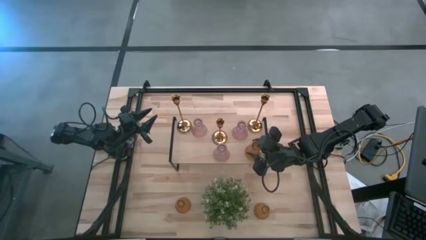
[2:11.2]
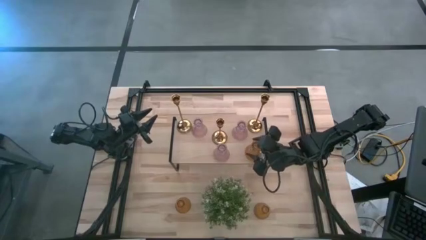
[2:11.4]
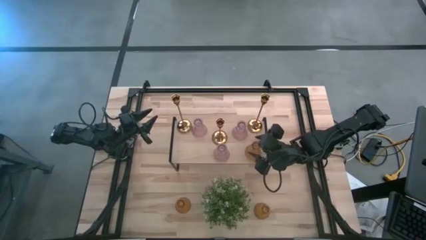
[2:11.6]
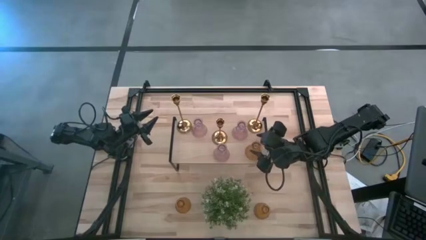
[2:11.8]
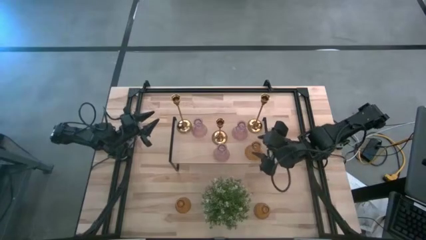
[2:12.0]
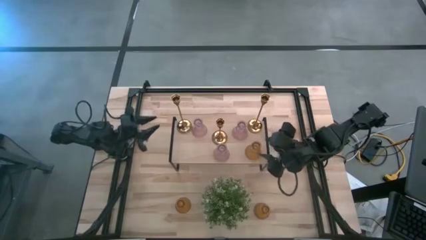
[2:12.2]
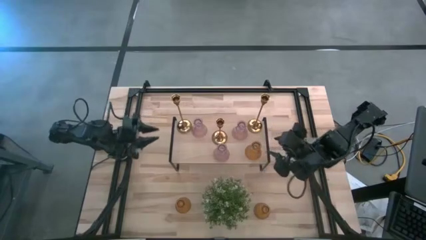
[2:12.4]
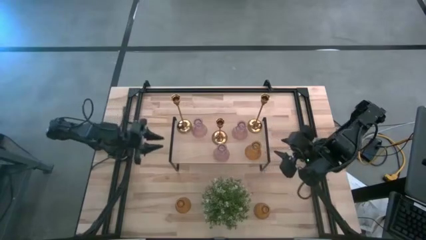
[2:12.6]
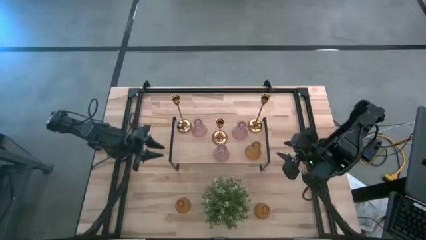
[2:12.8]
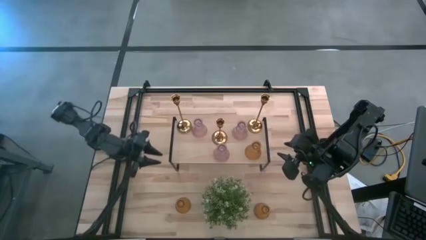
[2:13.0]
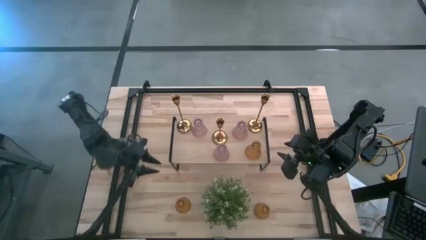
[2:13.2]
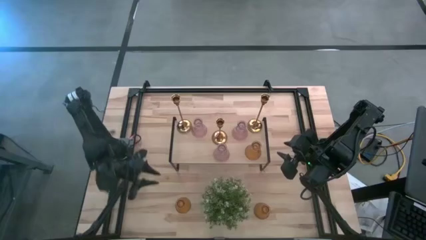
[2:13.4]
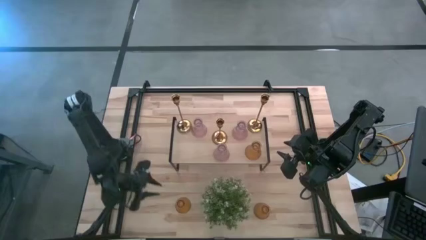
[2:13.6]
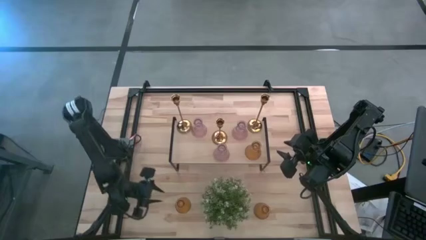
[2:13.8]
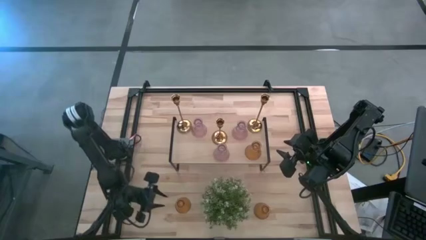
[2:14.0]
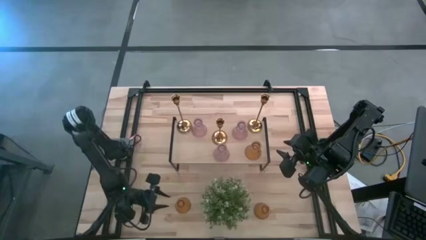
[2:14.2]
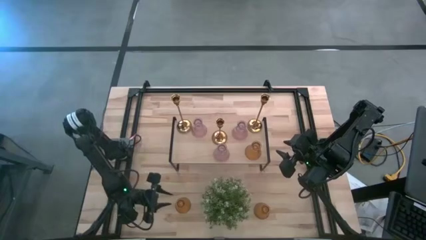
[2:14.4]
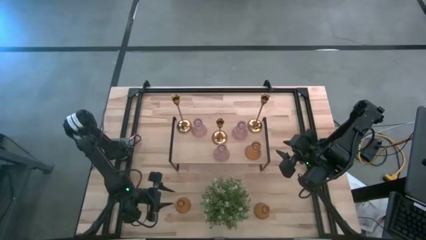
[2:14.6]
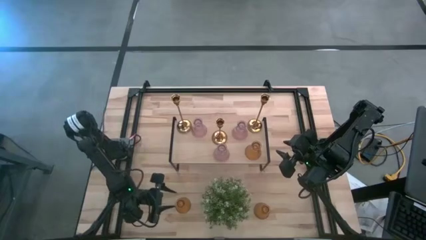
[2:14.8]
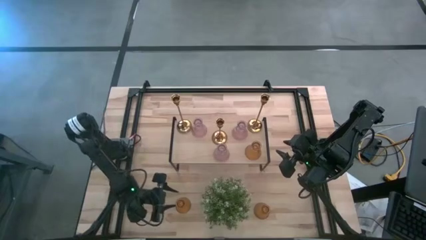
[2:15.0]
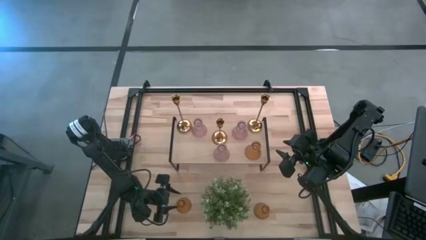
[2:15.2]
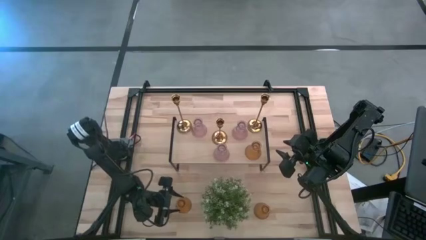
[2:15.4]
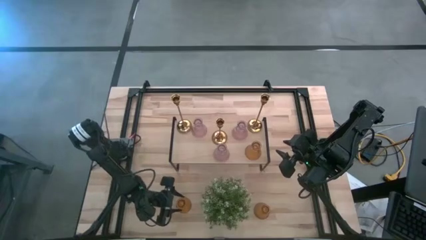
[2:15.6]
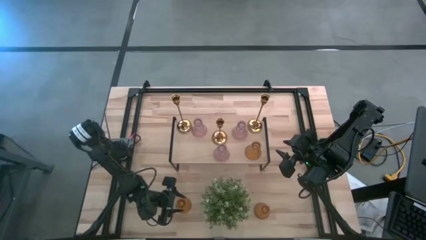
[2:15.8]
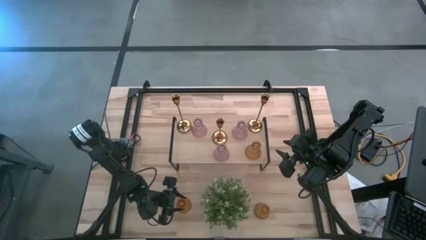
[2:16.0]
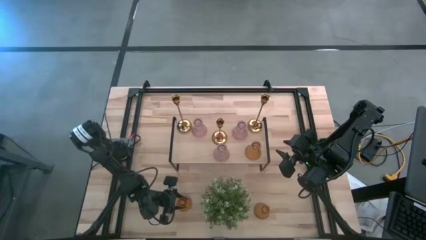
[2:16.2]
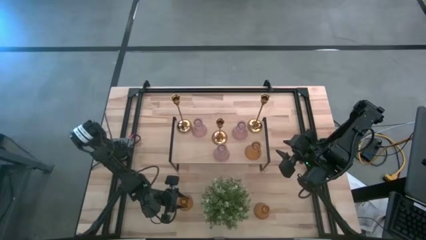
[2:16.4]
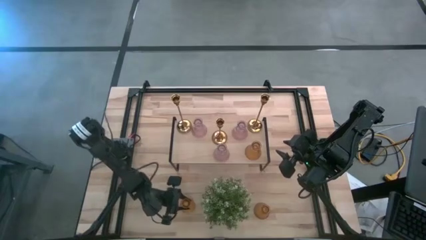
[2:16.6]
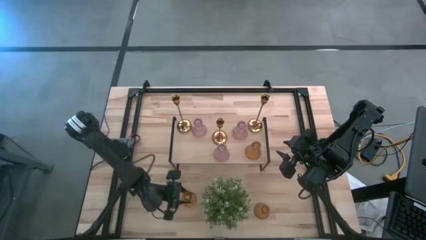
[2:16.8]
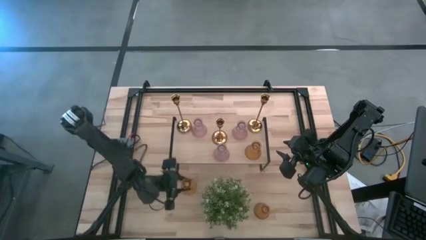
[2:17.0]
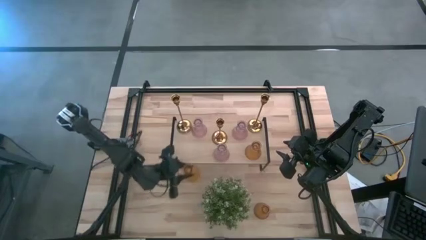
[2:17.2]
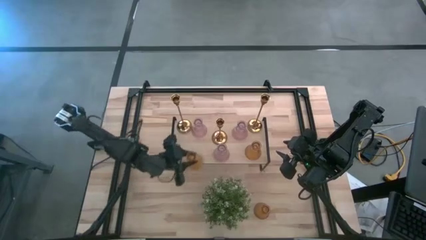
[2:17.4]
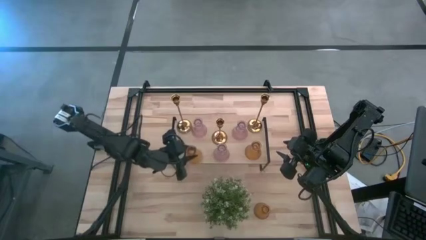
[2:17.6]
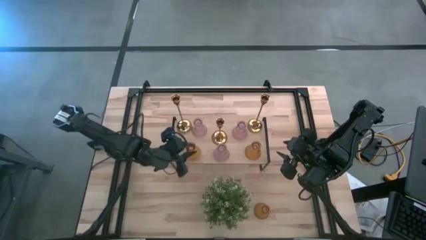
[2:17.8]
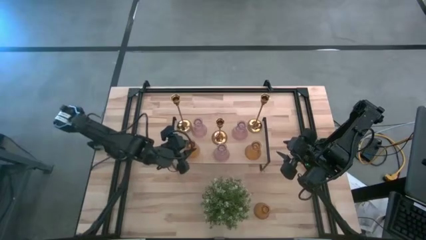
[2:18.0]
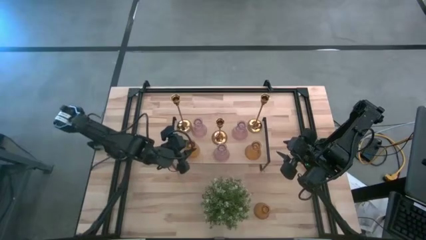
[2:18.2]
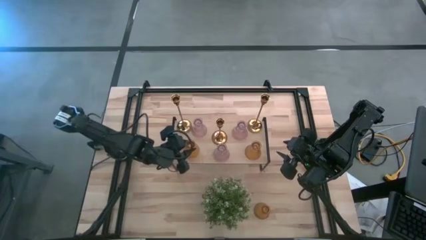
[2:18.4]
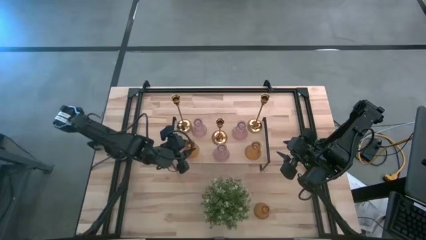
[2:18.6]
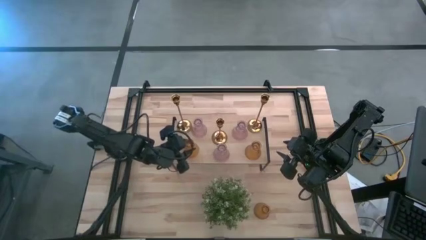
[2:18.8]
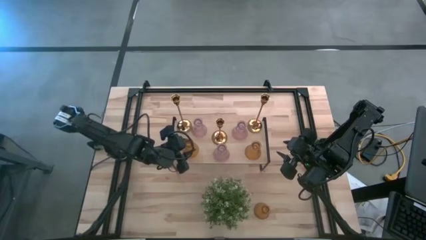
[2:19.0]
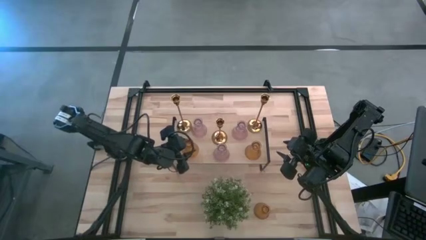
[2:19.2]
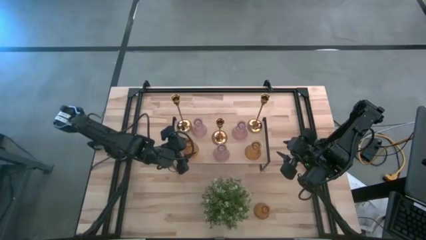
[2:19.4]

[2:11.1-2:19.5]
Task: Pick & Place candle stick holders
Put the left yellow vase on the shelf

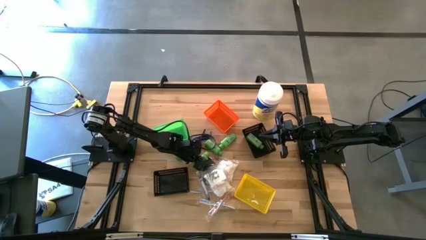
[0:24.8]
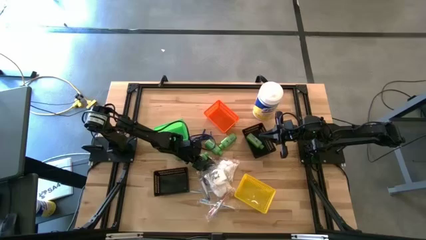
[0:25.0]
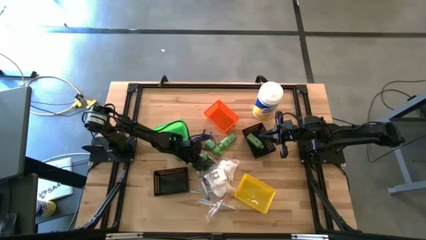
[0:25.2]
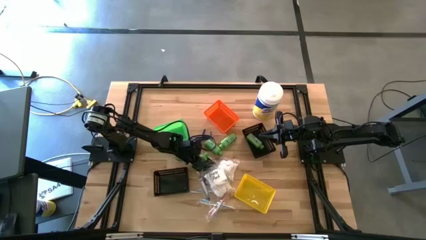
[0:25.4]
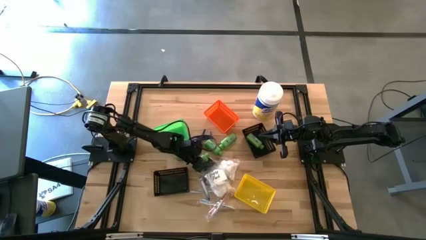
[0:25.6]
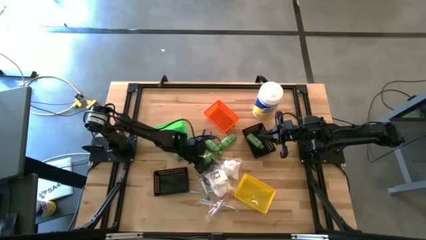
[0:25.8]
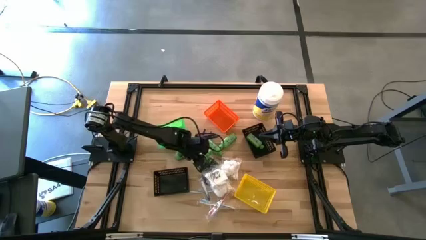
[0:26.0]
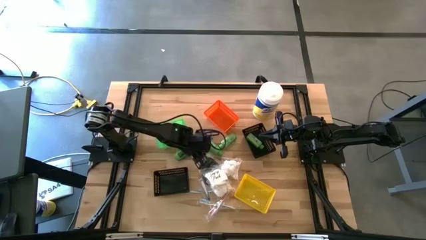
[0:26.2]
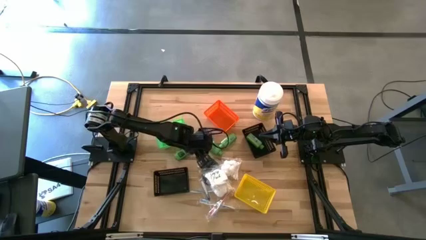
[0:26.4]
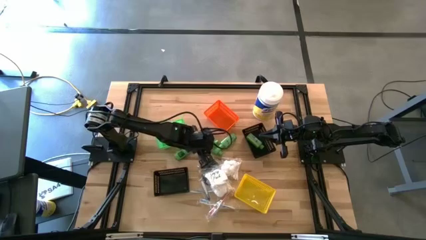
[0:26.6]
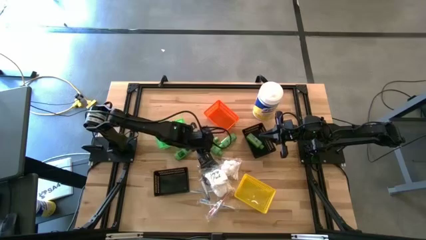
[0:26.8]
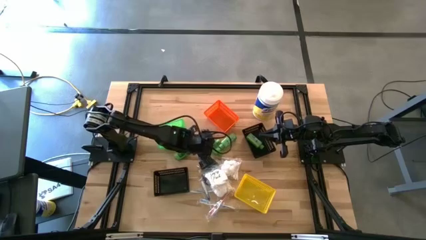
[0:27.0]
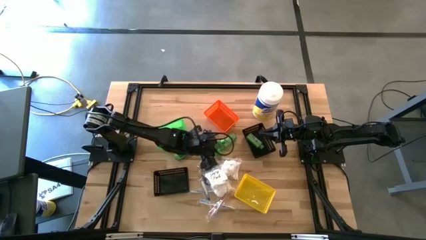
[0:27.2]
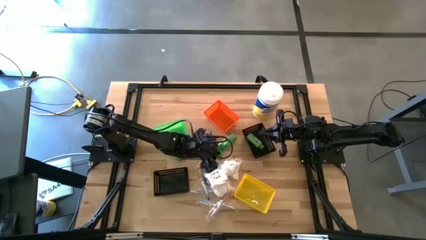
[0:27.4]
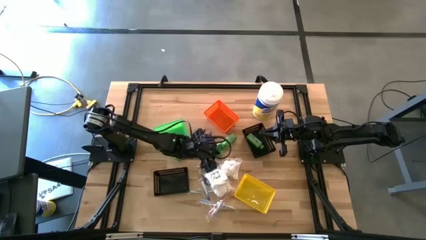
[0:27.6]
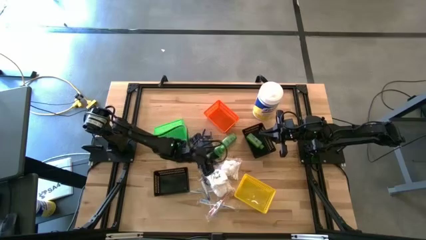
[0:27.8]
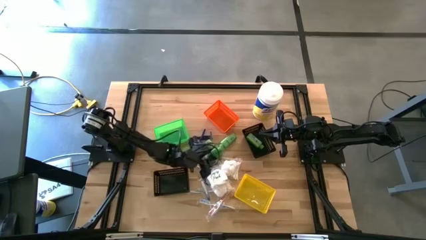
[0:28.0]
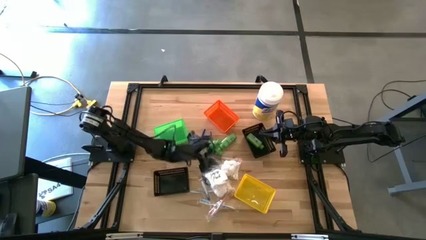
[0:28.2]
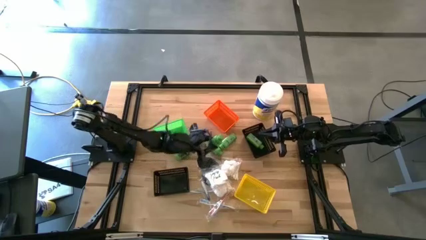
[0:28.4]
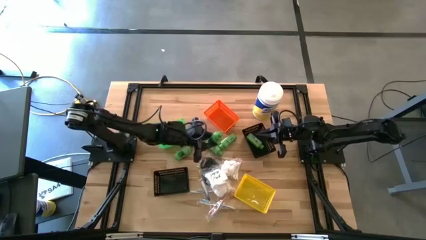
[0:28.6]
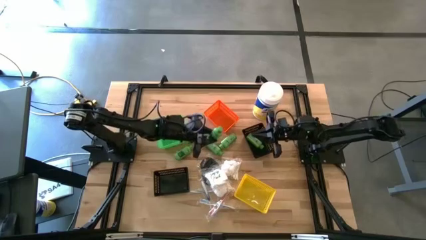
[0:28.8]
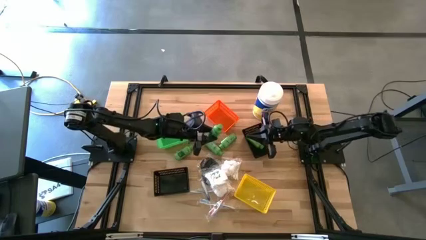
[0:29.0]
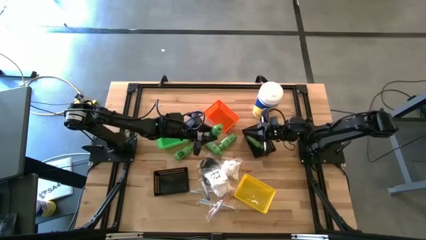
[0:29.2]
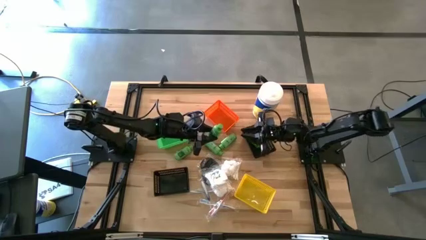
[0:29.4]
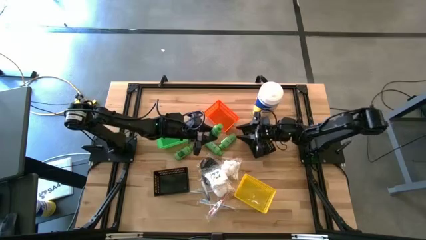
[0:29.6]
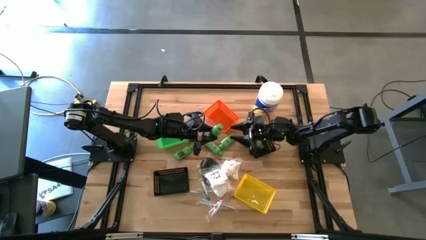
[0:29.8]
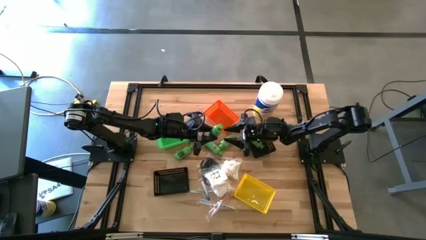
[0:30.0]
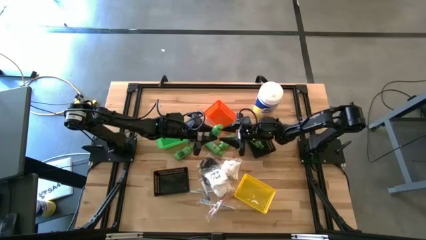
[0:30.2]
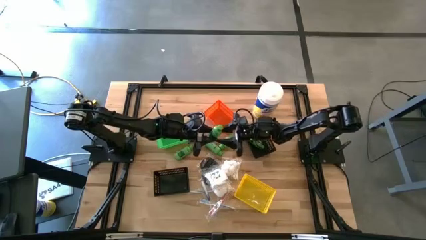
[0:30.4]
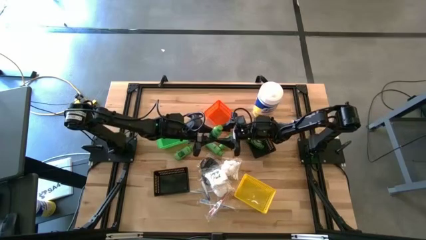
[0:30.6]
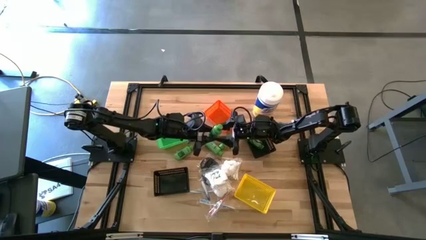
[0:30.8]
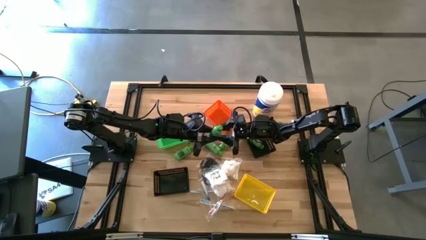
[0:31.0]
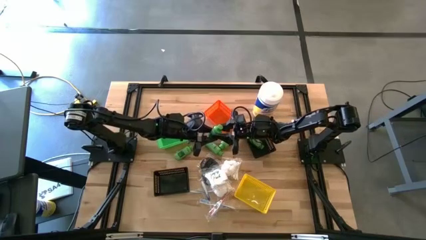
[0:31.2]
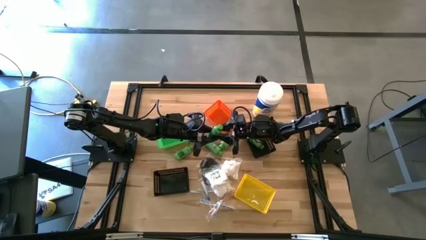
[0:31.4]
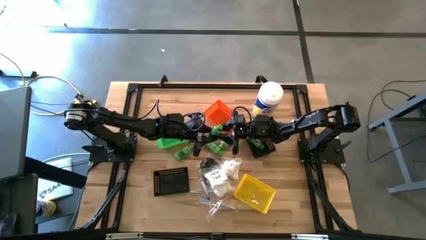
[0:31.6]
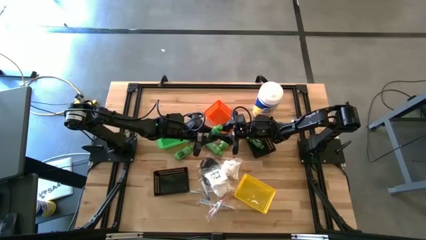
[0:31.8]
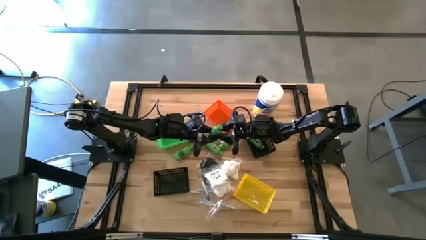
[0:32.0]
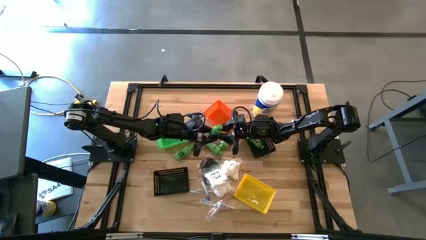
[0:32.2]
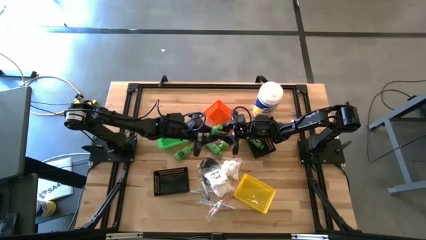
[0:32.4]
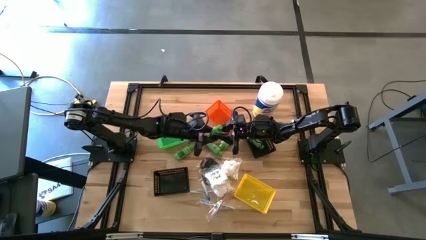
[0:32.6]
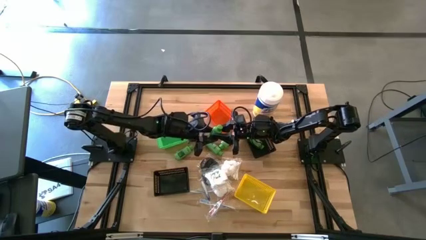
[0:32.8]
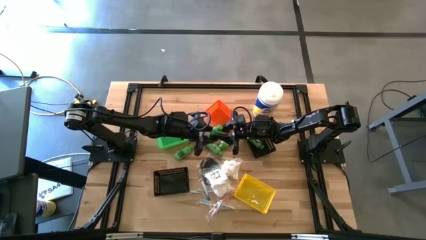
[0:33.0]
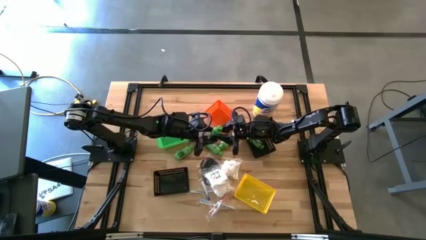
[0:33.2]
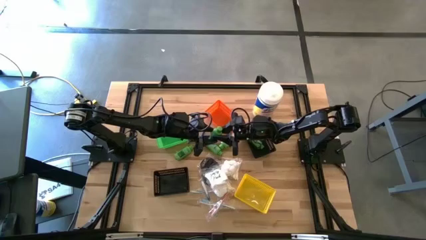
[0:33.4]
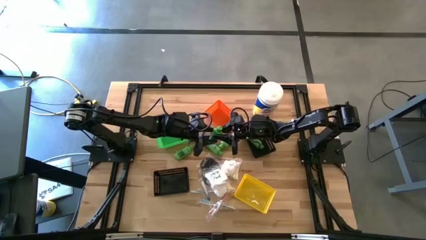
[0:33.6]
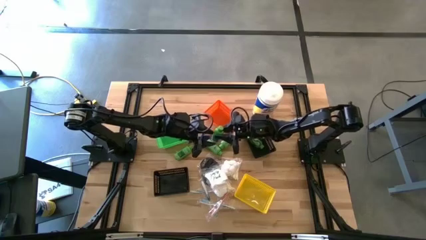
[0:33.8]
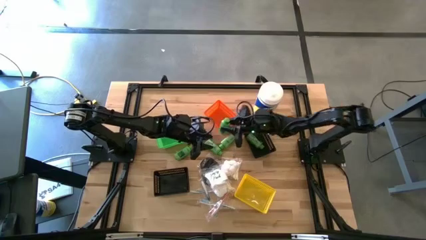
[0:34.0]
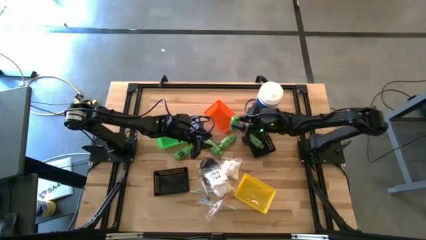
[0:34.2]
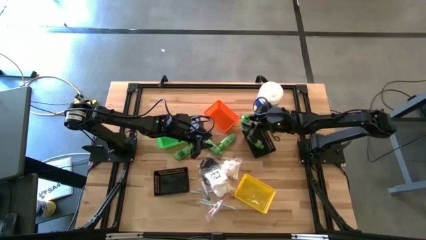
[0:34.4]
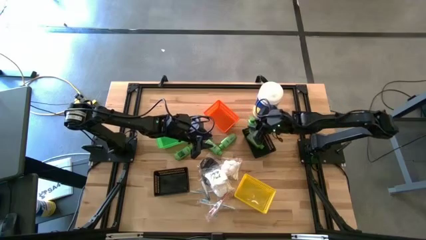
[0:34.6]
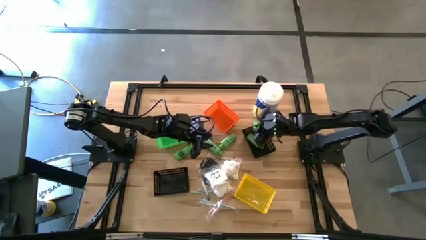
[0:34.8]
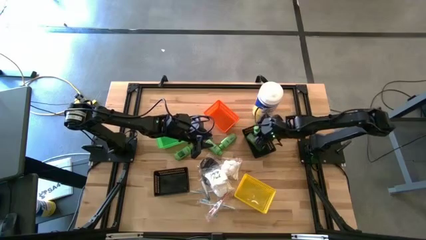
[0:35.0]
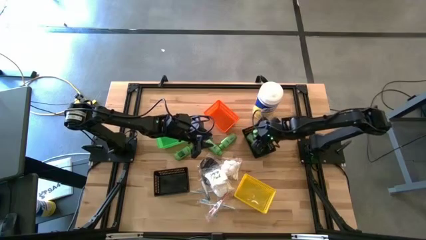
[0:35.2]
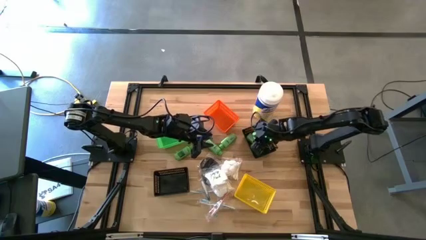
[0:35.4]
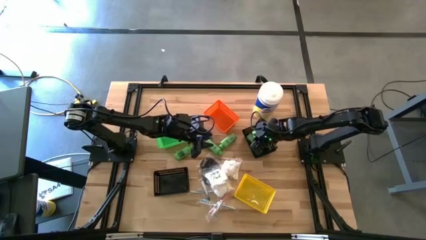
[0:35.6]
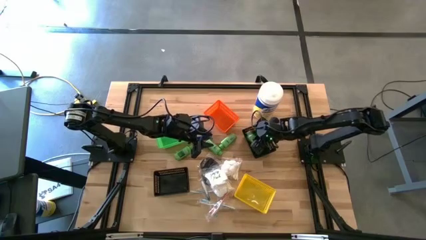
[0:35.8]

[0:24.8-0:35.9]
Task: Pick & Place Travel size toiletries
Put the green shampoo into the top black bin
